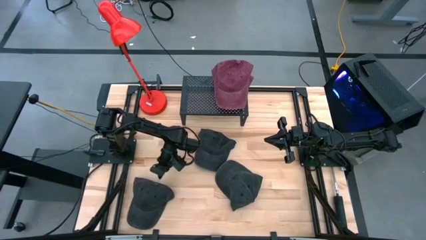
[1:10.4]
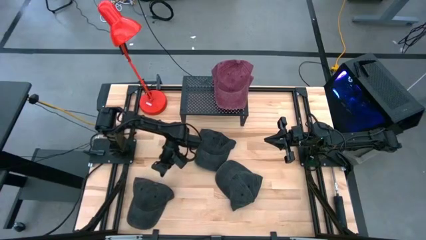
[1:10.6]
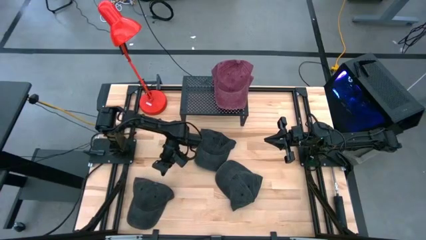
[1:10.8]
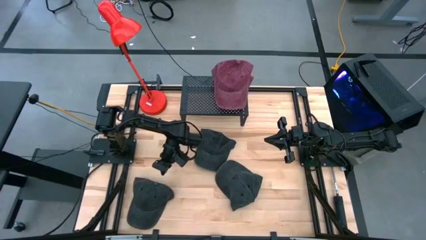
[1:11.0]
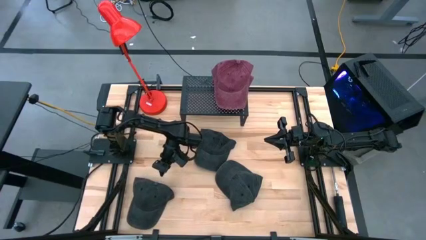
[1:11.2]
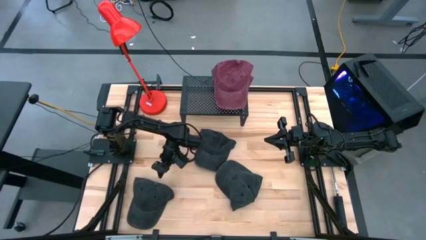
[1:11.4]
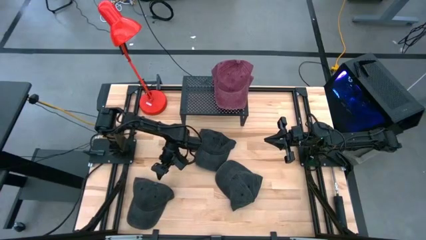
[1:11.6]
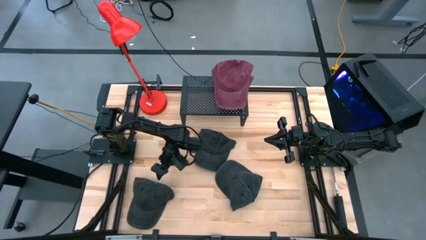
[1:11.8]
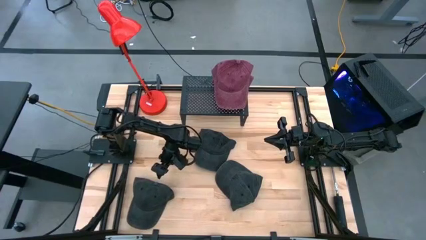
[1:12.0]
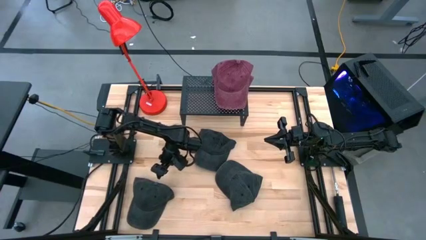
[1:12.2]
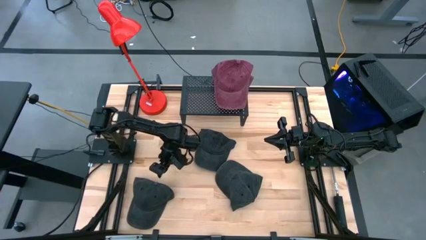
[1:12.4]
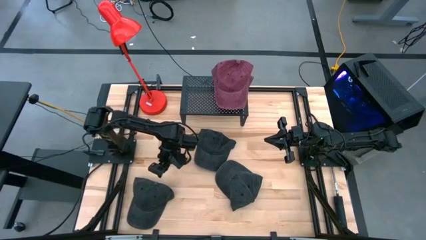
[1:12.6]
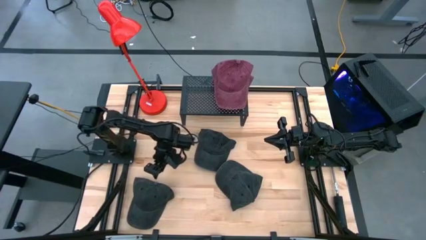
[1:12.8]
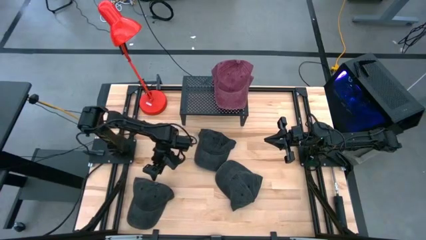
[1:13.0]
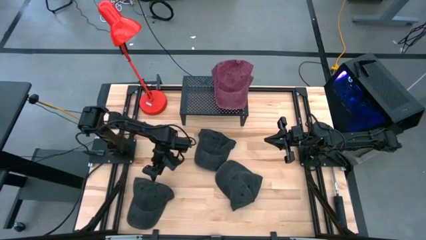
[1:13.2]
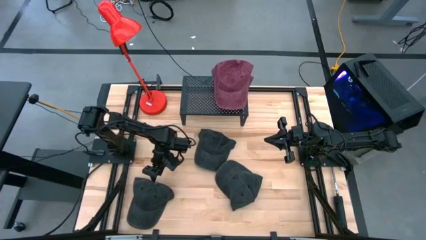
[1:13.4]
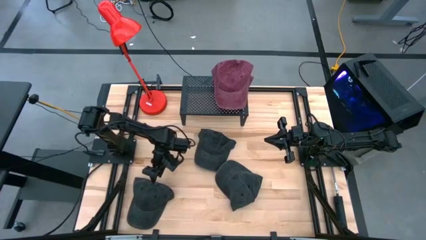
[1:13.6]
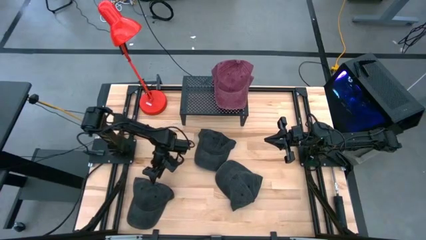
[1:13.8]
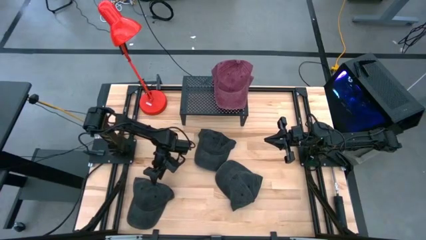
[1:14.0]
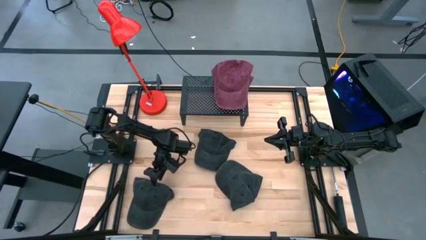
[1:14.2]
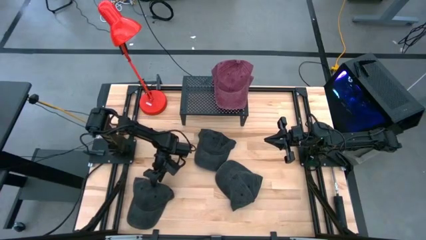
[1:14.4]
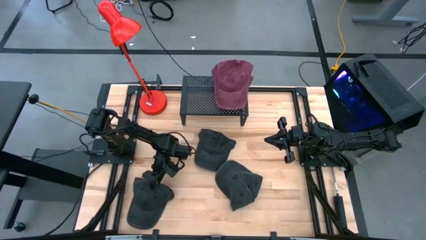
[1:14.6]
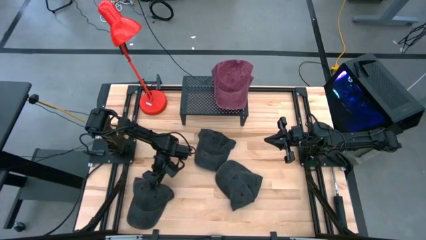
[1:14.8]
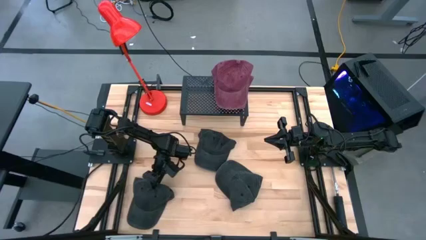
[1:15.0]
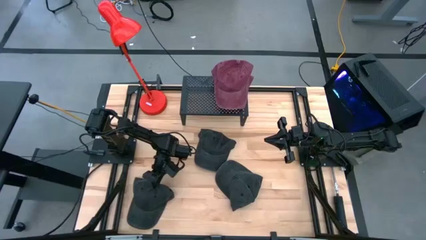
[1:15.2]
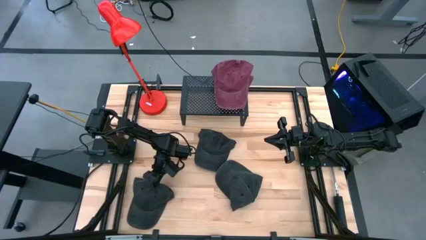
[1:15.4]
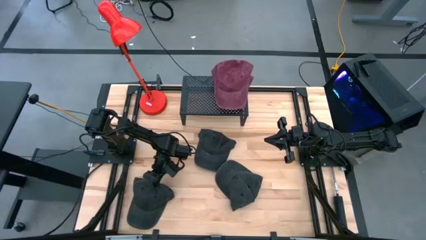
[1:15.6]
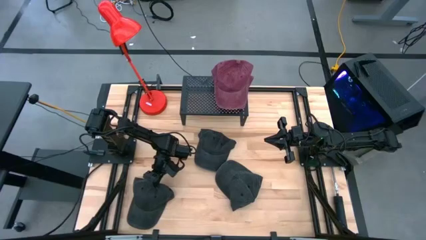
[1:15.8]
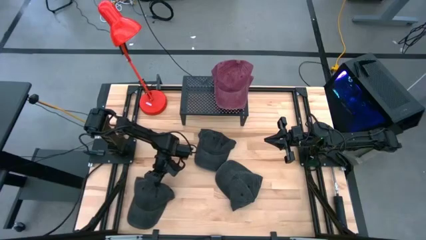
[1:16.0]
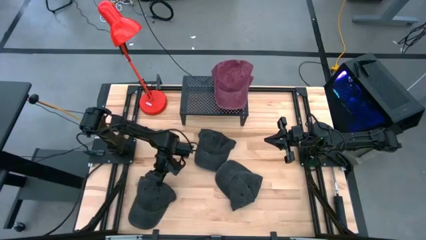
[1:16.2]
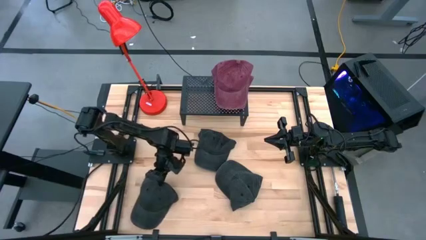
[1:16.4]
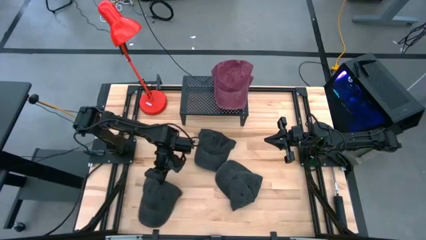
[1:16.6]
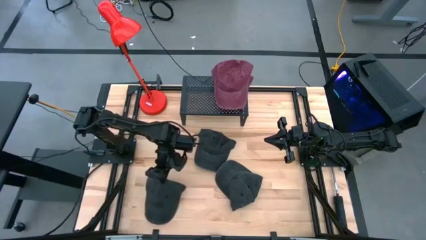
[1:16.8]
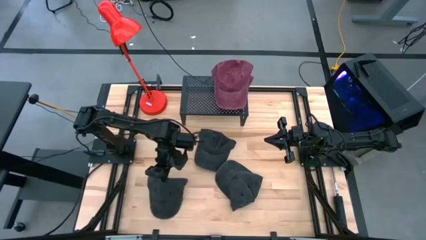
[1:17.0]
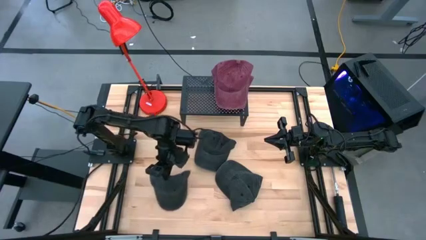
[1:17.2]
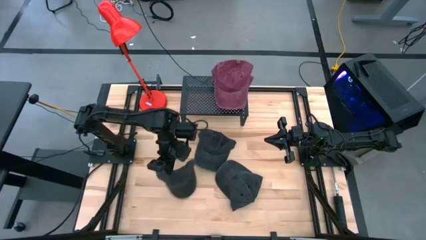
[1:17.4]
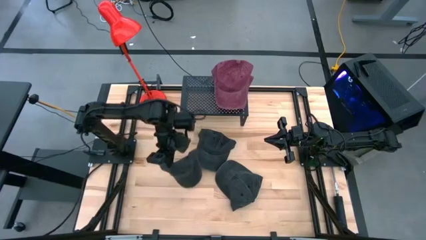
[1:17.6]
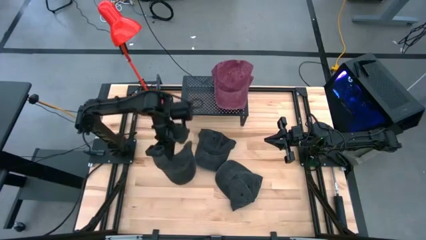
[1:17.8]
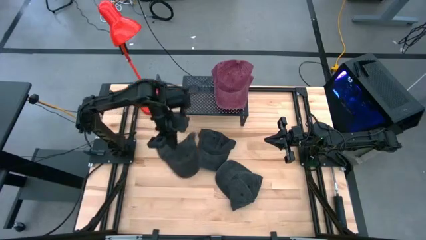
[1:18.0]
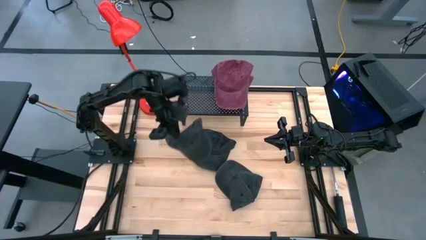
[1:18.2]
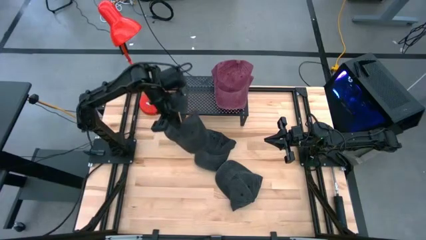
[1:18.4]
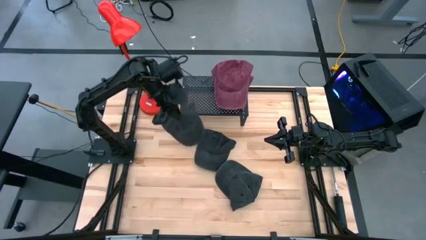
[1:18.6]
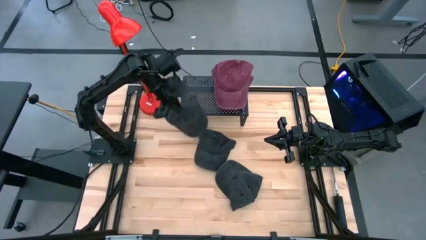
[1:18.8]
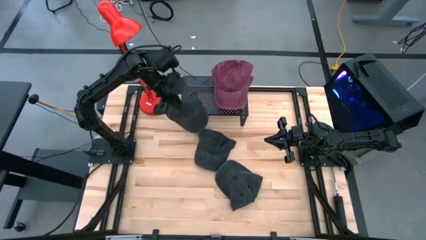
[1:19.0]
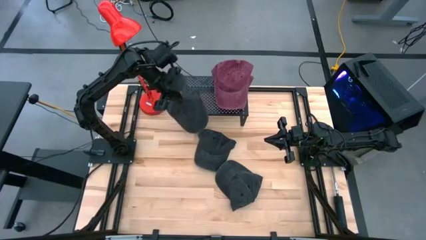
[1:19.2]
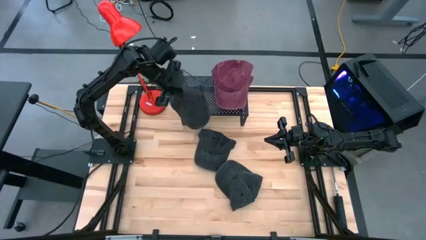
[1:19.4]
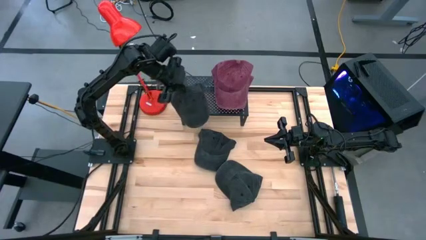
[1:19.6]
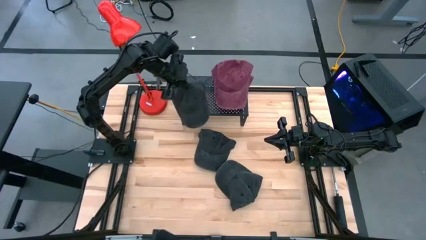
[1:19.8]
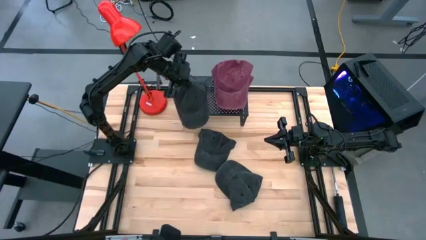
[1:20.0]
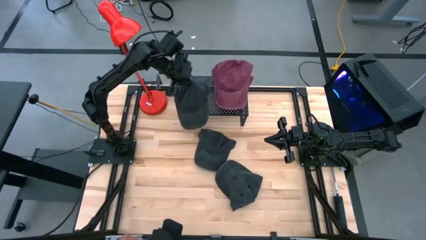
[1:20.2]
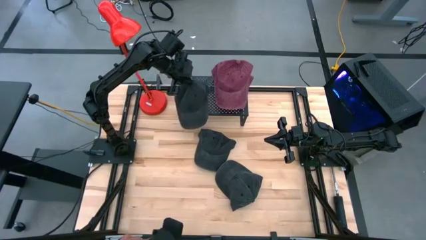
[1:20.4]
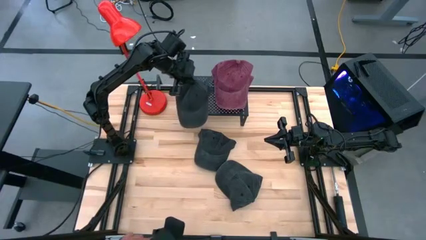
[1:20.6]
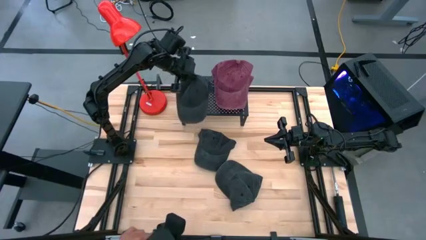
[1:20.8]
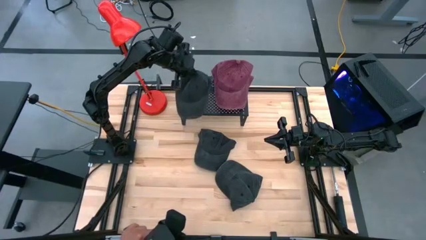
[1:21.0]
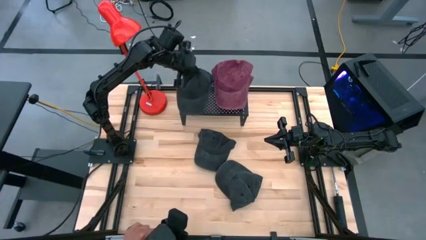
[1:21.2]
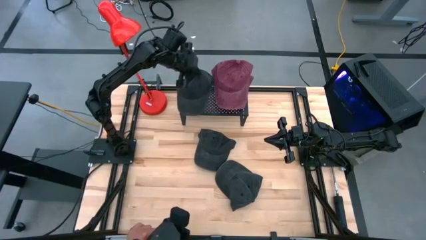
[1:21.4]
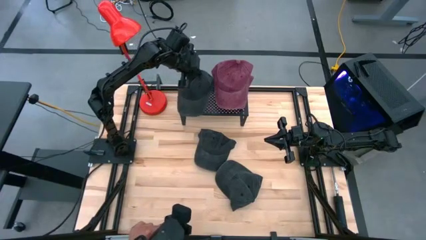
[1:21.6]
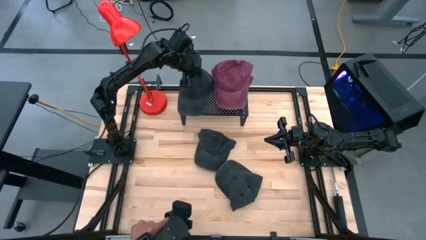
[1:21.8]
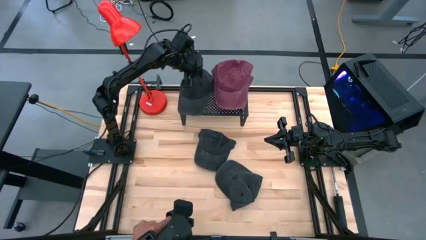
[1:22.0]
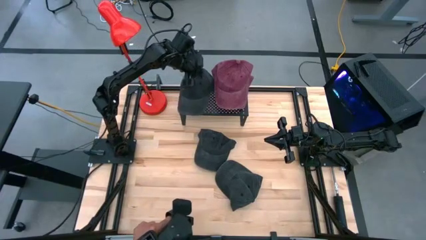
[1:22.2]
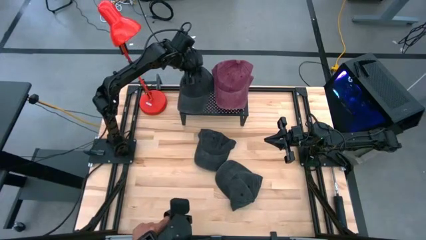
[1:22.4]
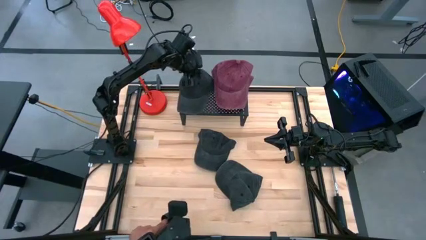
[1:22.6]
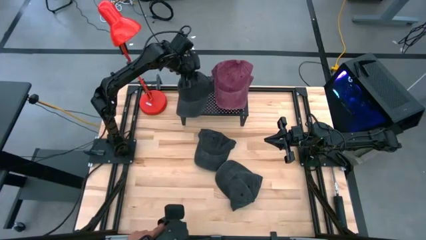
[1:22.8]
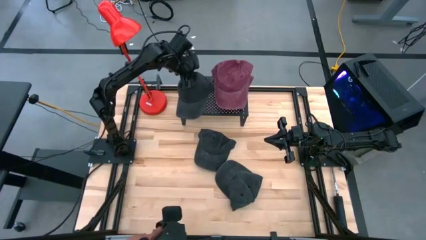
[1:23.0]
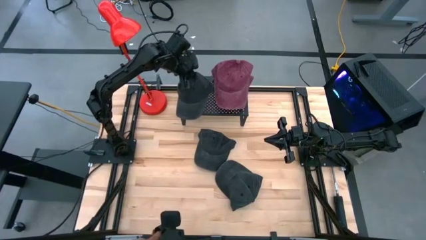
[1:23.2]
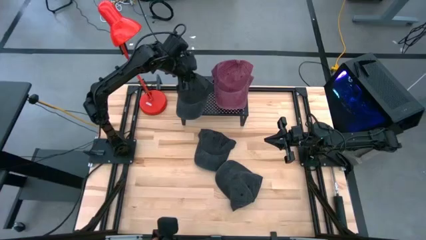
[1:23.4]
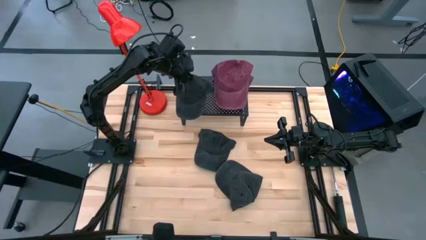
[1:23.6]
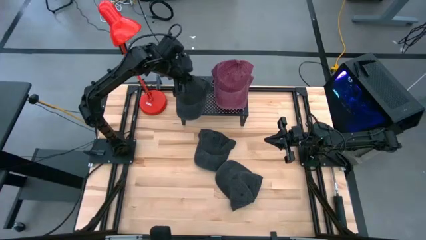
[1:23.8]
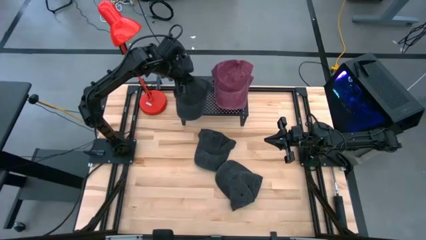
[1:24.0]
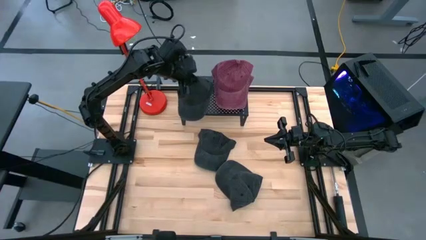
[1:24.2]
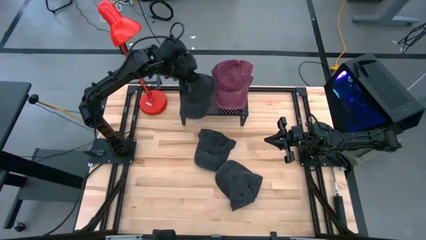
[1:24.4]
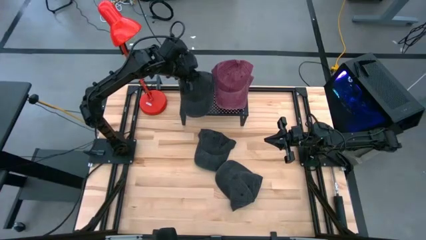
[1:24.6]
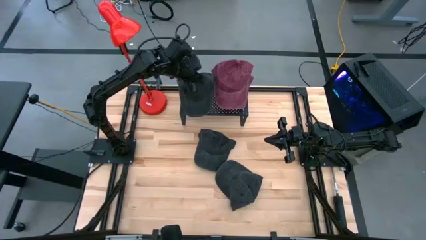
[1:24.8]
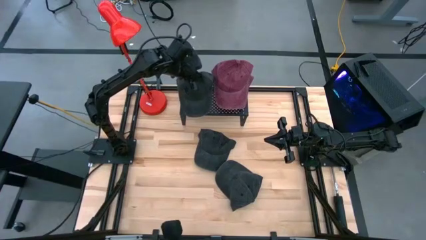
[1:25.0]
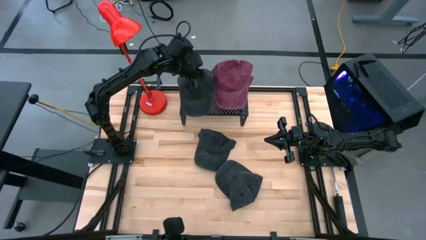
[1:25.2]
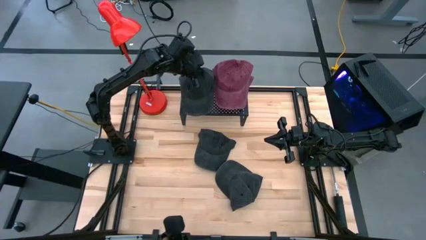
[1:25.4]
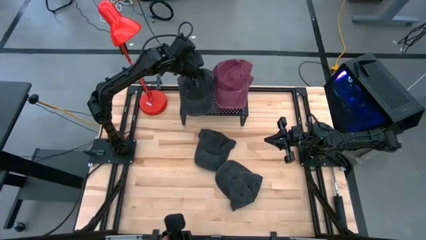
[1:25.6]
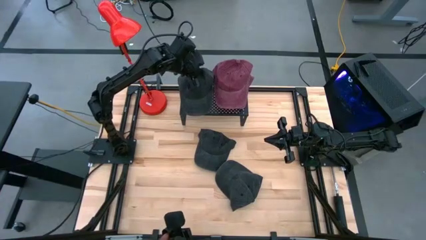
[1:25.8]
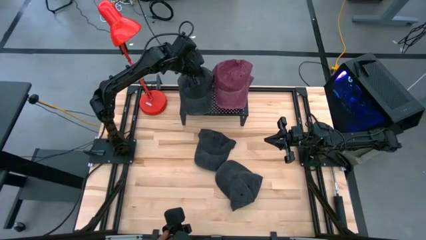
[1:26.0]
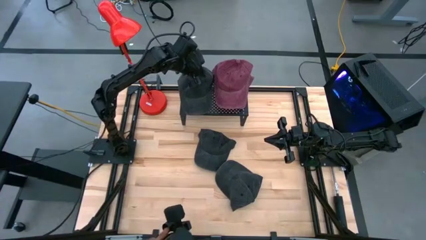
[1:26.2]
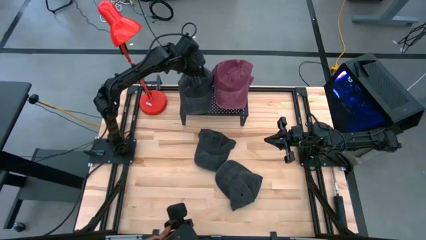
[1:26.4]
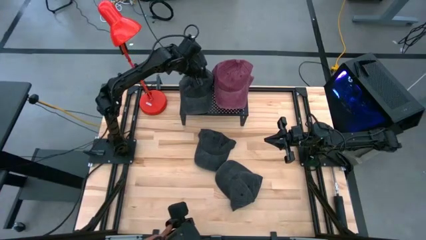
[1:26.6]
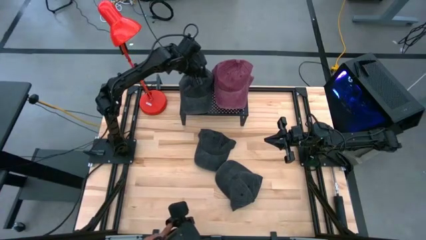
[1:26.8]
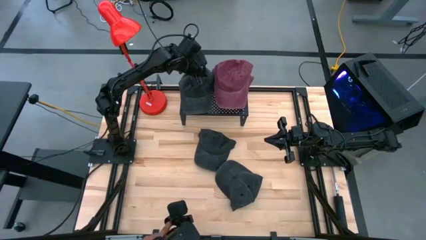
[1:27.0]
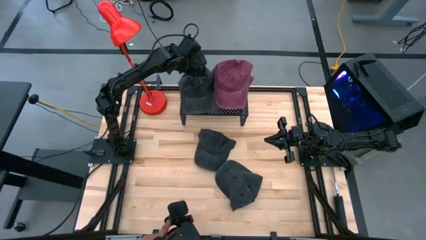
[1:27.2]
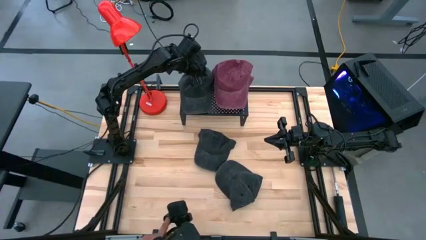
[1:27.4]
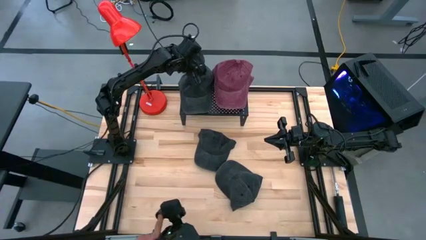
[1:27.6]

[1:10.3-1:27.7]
Task: Pick & Place hat
Put the bottom left black cap on the shelf
